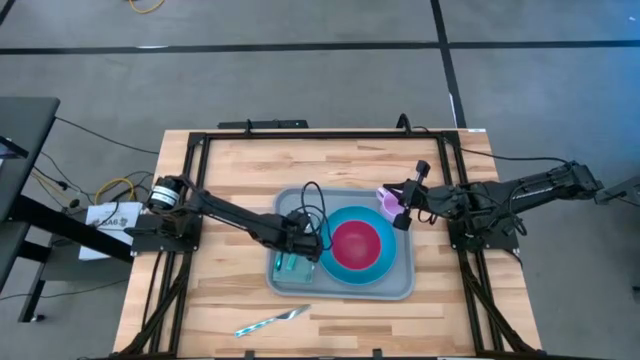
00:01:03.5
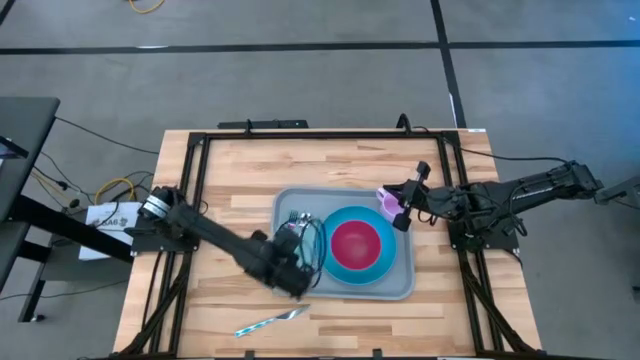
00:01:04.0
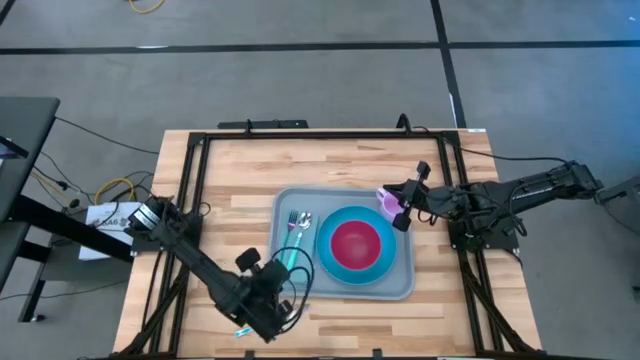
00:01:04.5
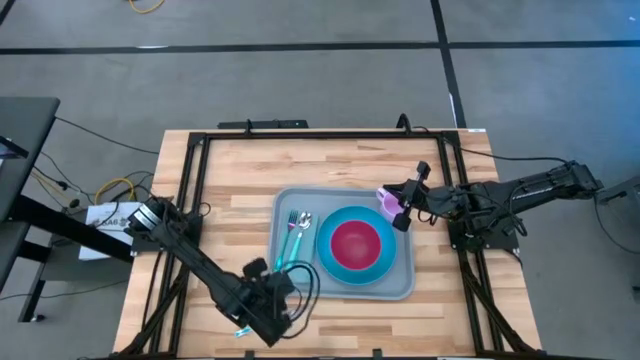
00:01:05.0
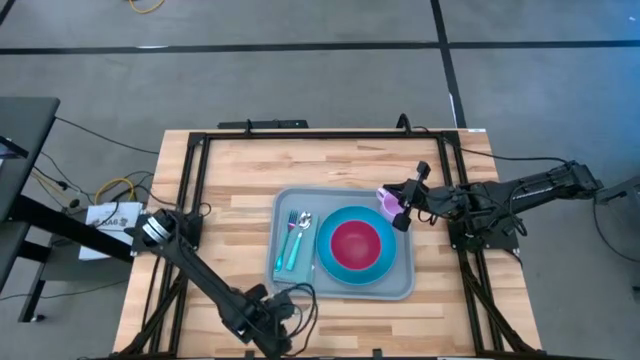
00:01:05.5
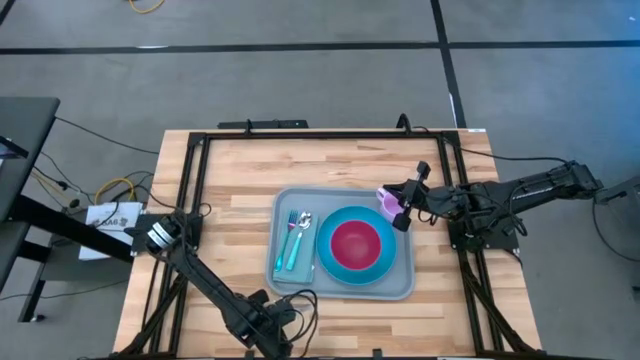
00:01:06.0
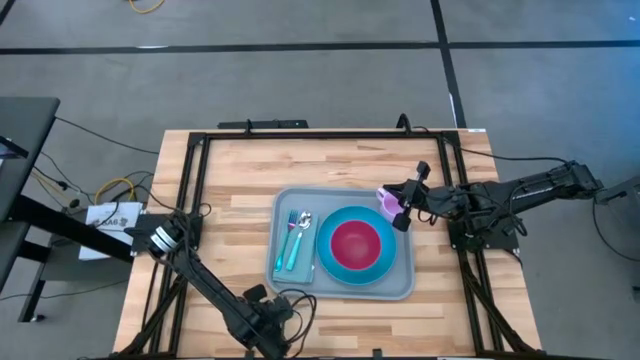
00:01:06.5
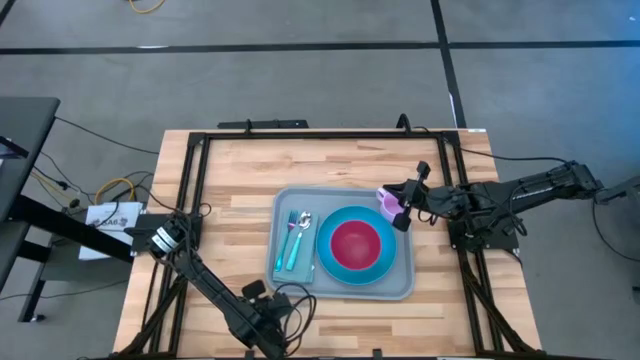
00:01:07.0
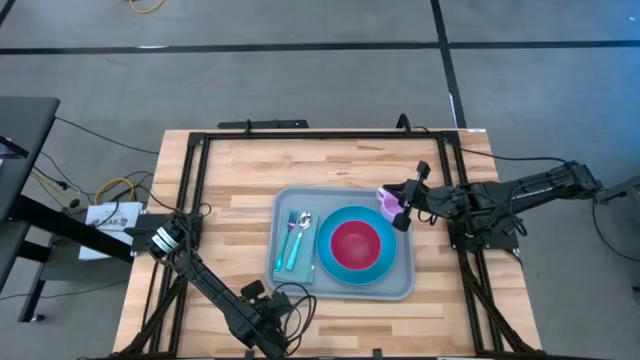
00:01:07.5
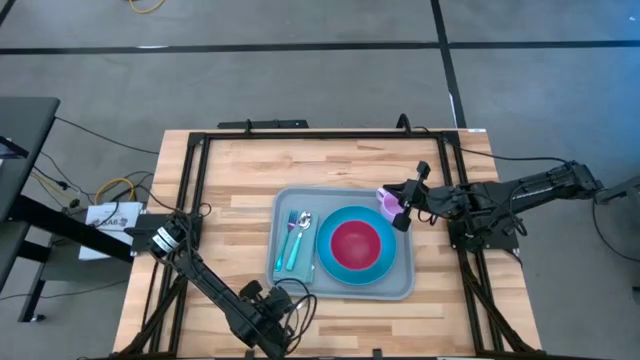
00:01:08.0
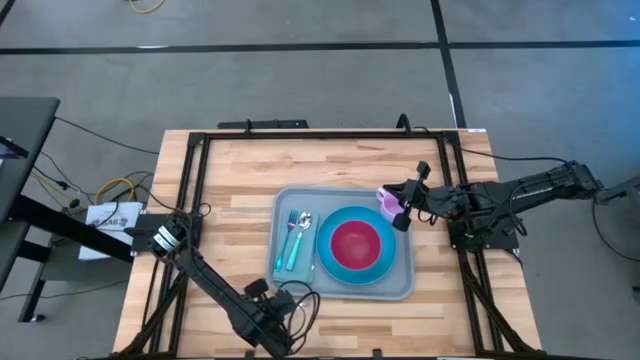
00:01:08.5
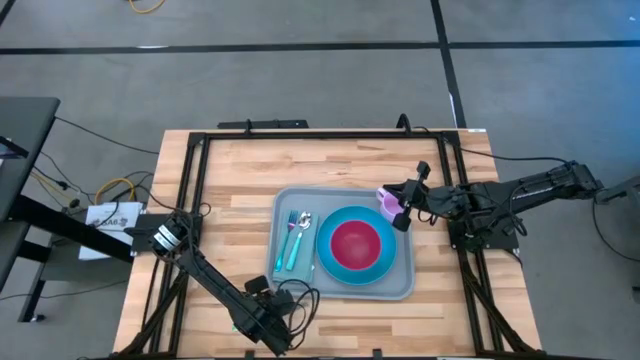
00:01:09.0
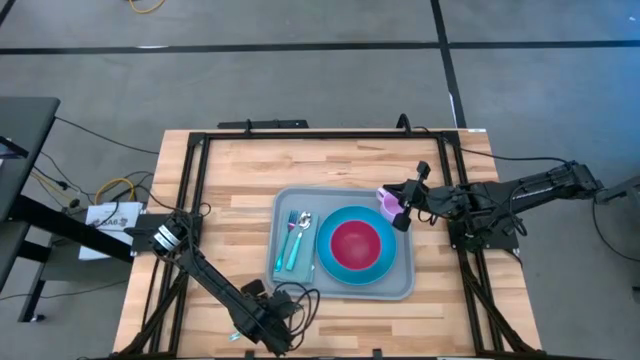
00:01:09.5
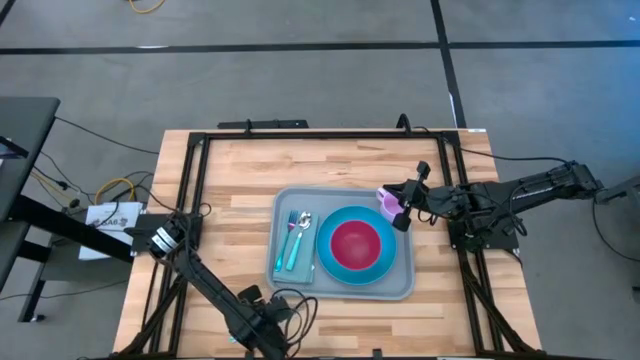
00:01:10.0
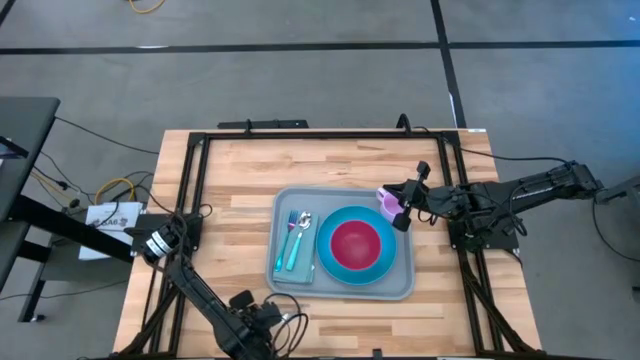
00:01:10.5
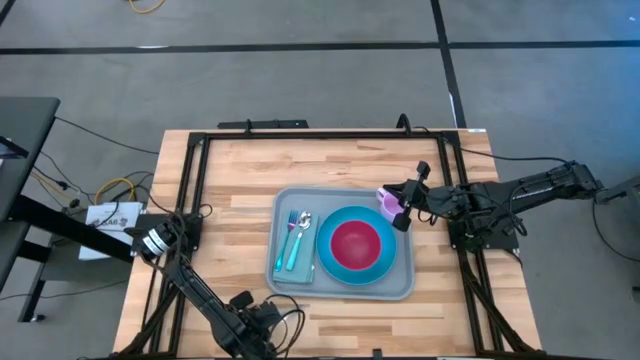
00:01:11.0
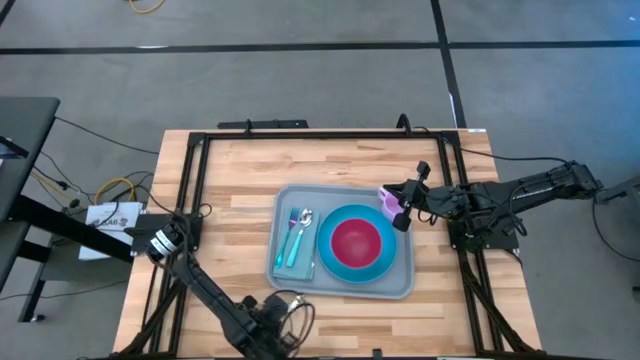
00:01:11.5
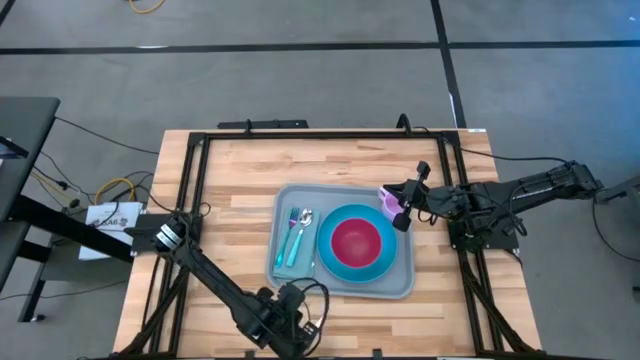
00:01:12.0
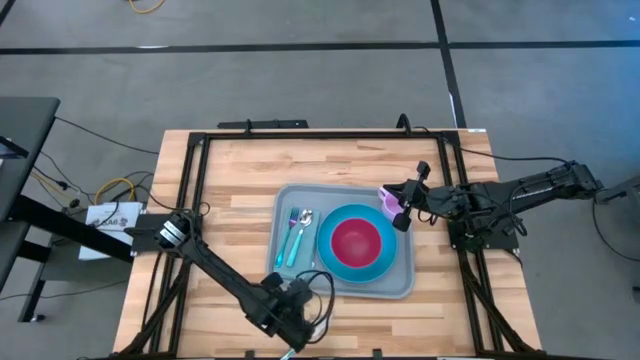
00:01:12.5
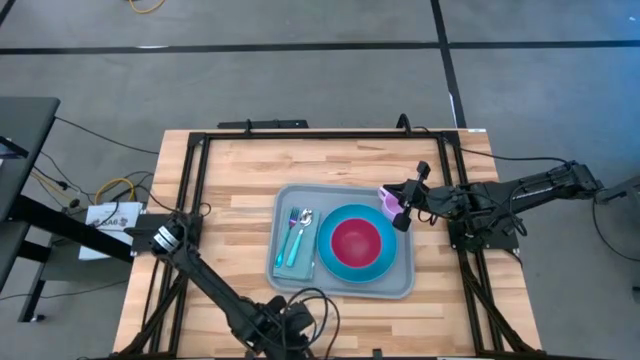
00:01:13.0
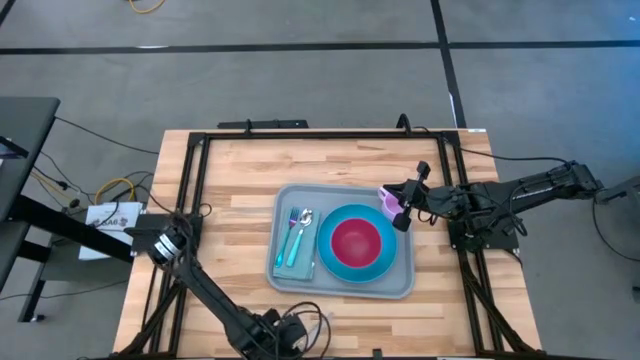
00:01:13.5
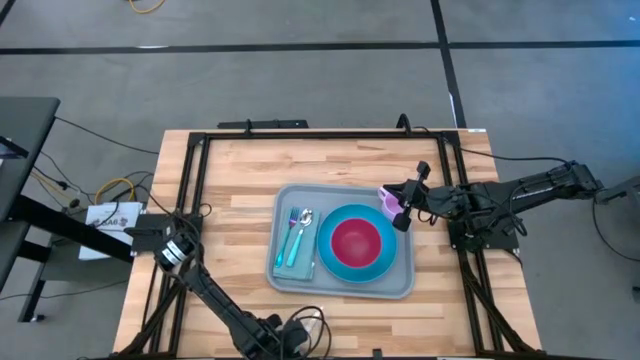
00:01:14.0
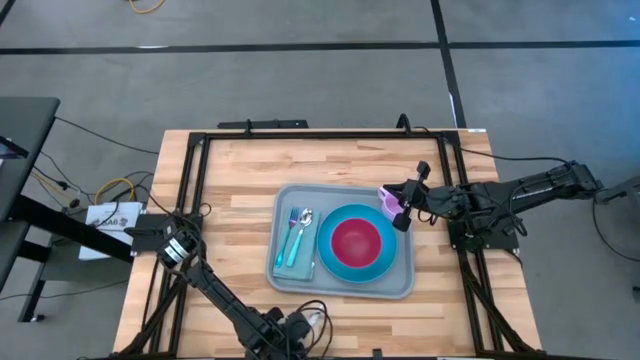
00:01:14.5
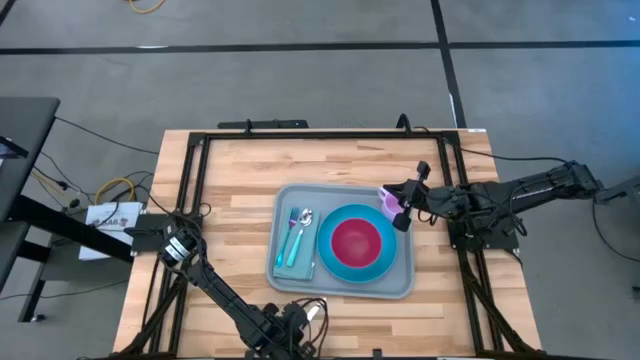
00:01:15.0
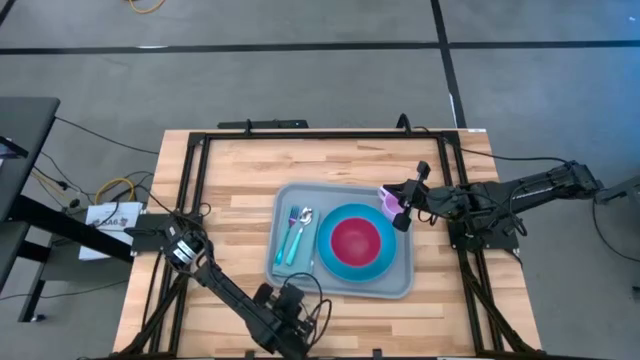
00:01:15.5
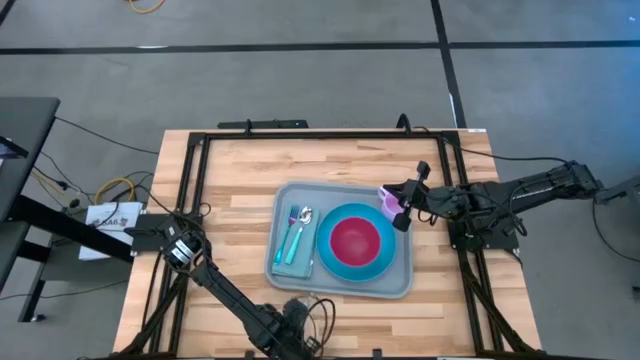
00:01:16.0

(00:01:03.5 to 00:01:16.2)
Task: Set up tray
Put the white knife on top of the blue napkin

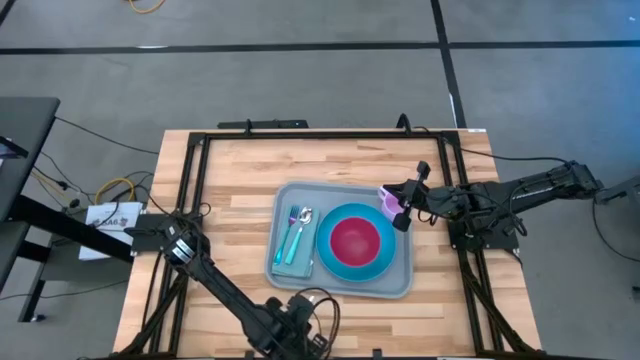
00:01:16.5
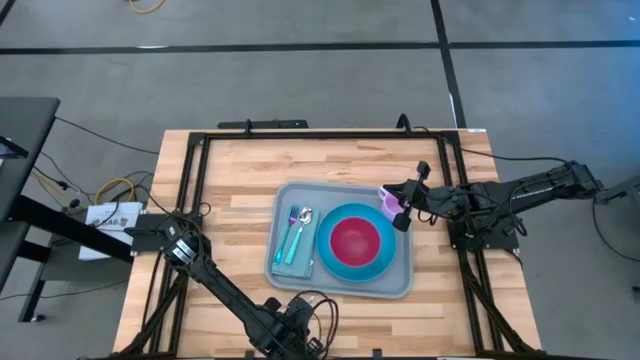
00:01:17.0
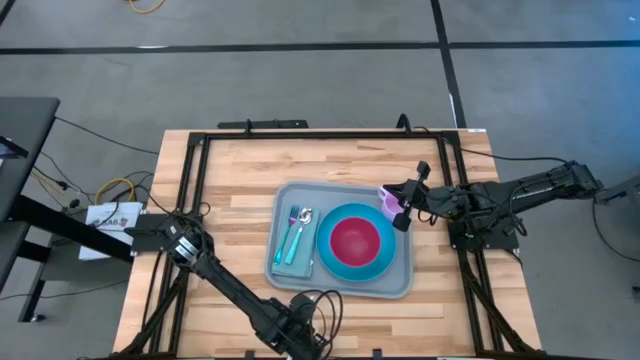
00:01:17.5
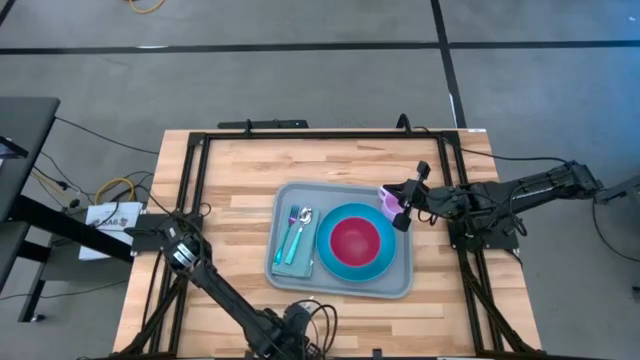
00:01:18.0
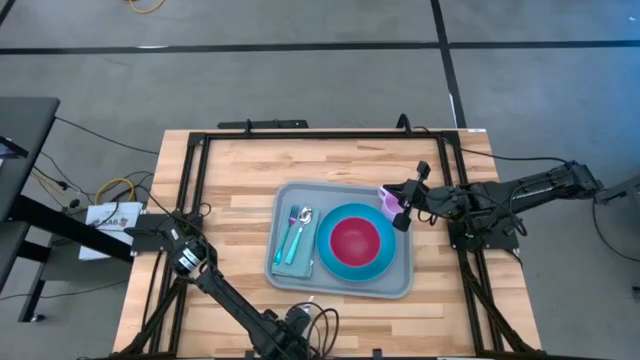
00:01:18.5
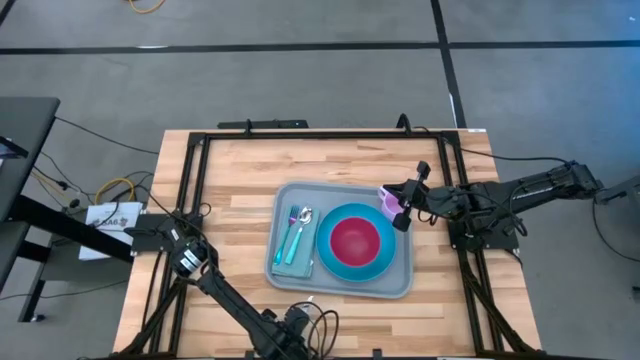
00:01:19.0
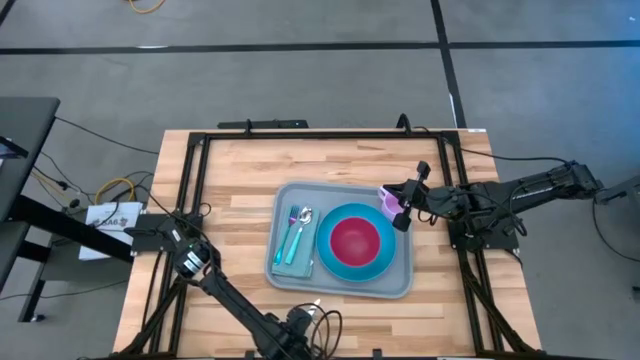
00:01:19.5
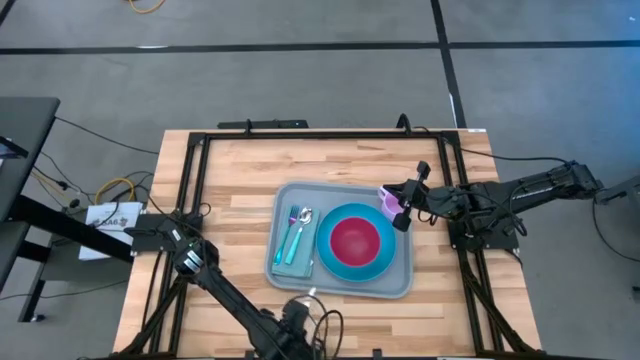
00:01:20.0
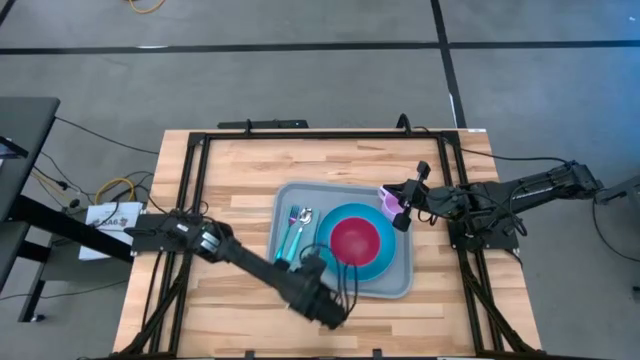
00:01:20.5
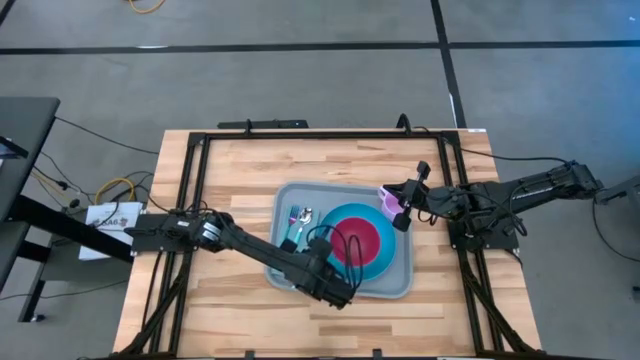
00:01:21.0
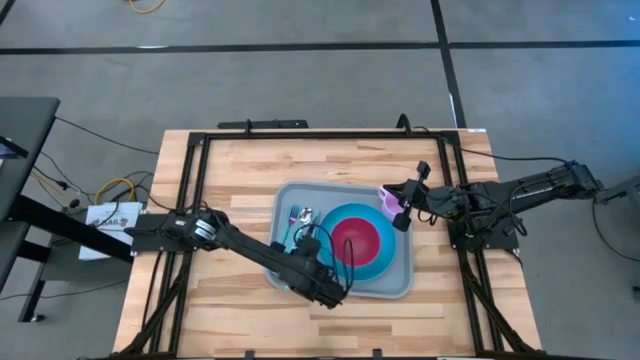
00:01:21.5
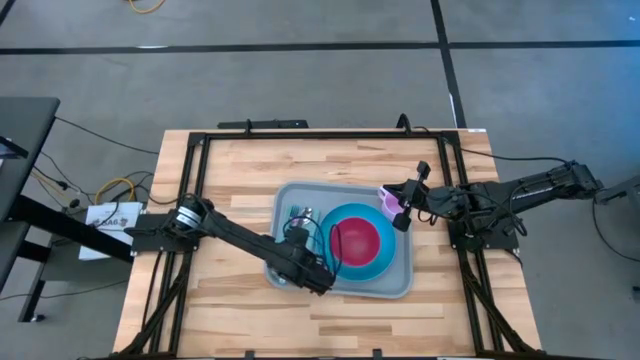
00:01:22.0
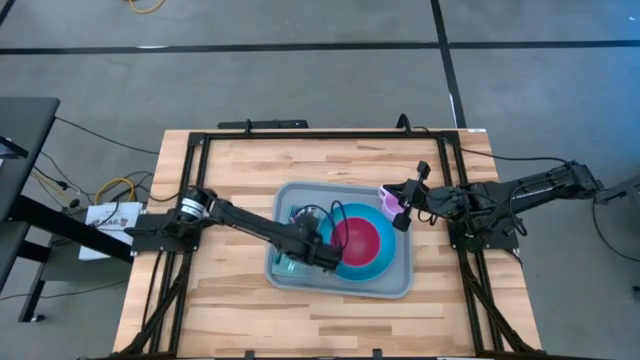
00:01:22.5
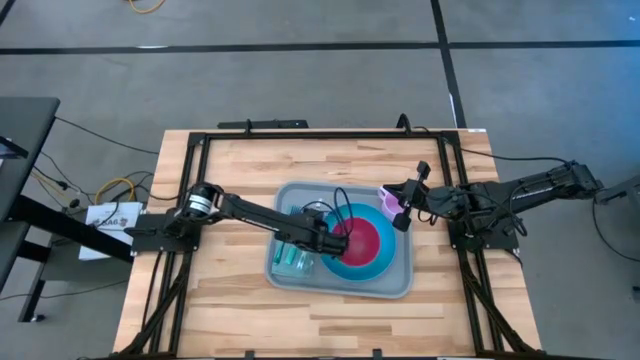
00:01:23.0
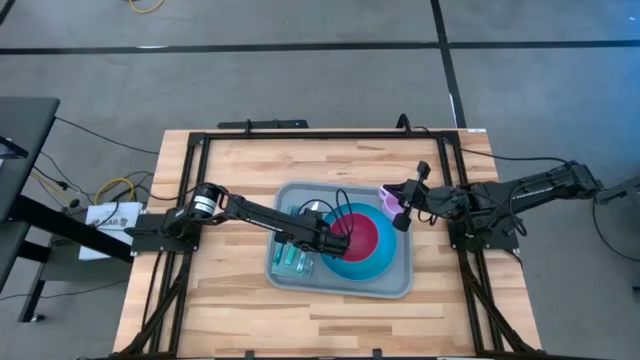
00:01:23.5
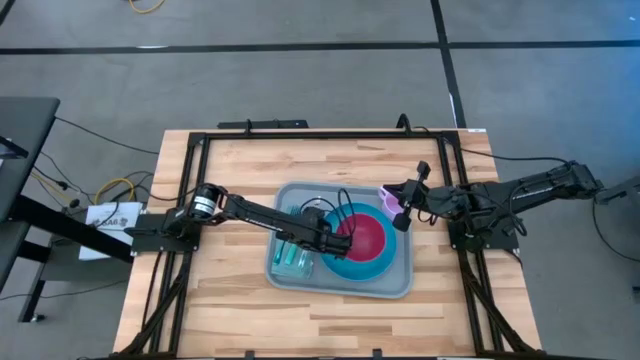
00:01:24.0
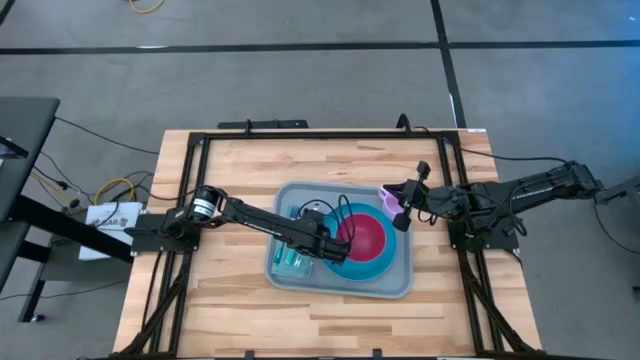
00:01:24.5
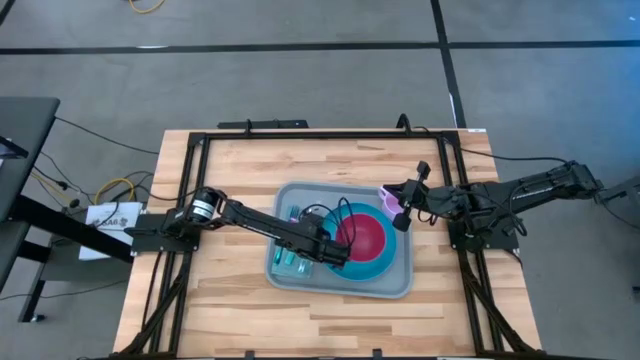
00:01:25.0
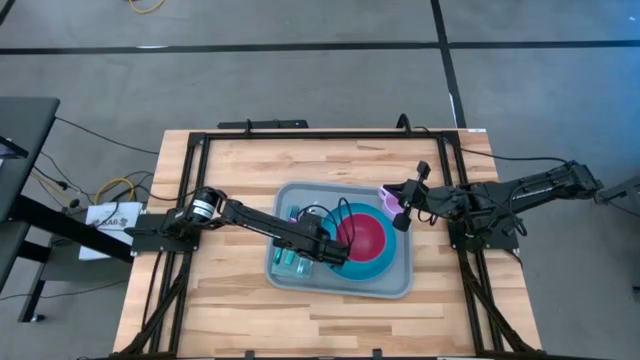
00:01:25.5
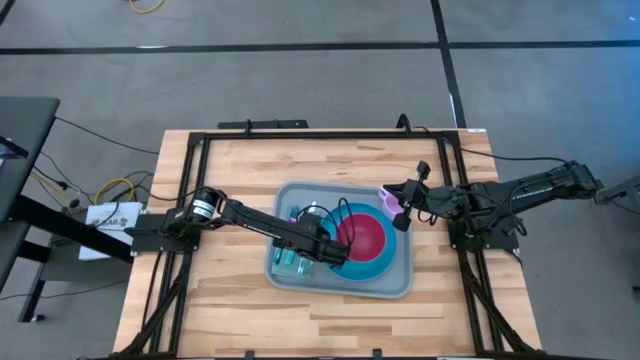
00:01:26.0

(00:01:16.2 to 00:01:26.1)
Put the white knife on top of the blue napkin
